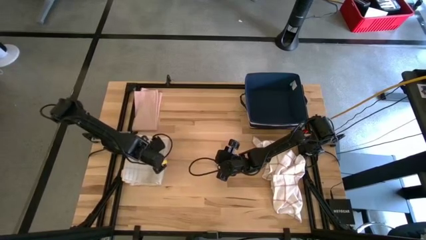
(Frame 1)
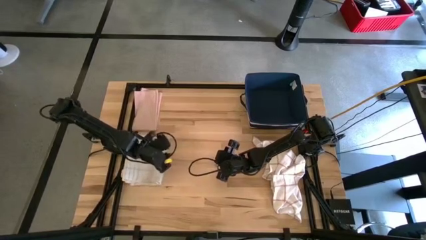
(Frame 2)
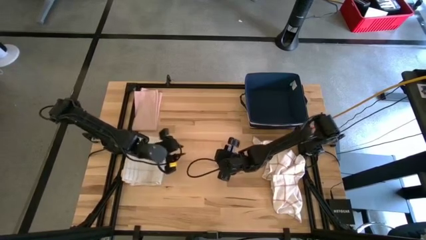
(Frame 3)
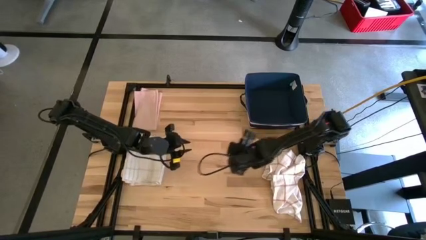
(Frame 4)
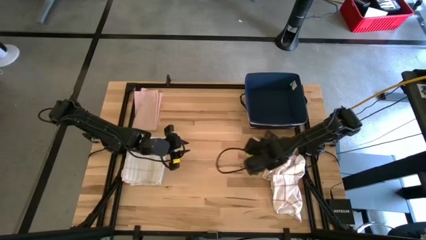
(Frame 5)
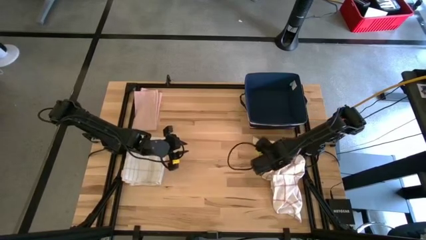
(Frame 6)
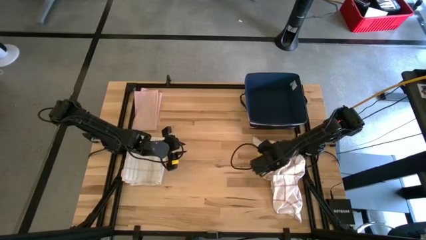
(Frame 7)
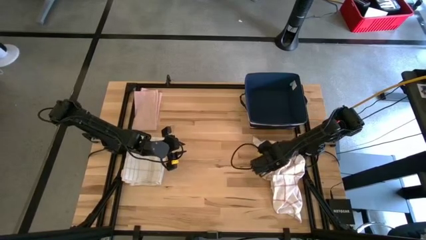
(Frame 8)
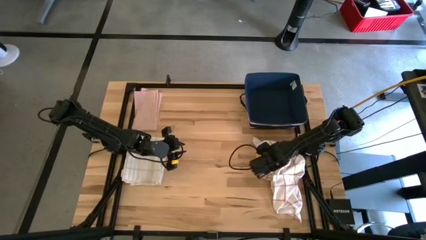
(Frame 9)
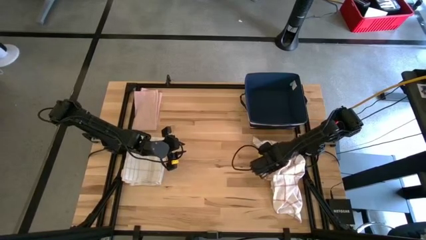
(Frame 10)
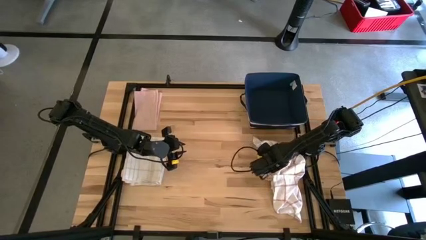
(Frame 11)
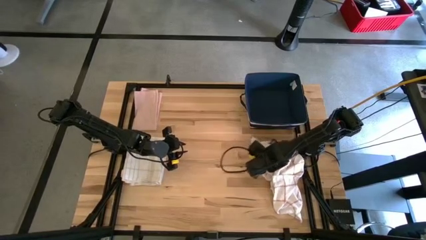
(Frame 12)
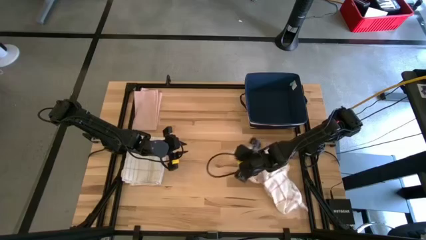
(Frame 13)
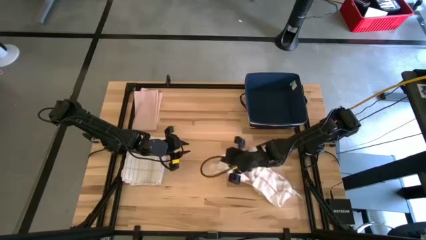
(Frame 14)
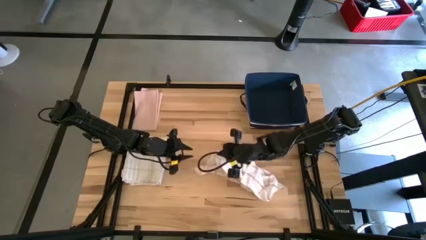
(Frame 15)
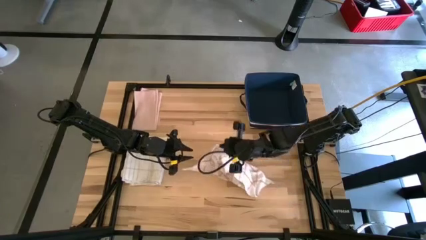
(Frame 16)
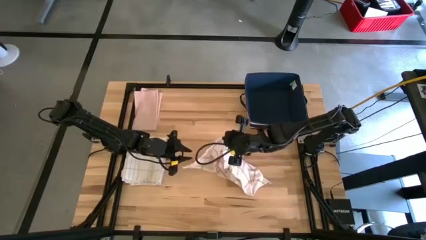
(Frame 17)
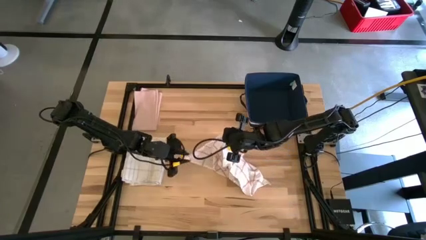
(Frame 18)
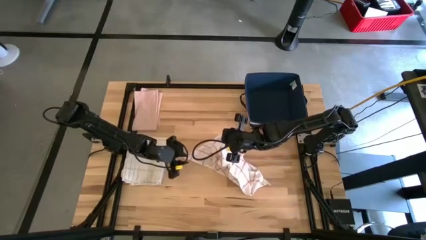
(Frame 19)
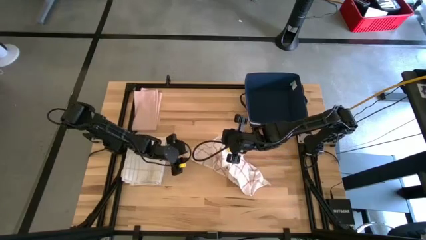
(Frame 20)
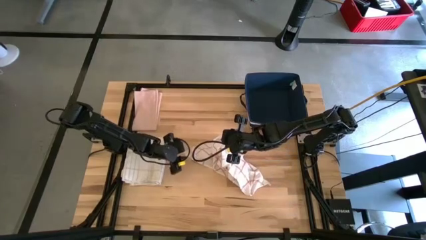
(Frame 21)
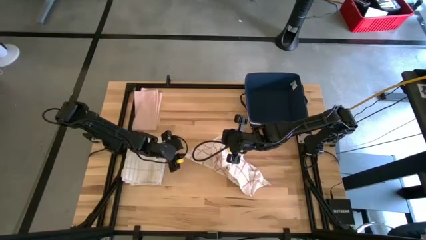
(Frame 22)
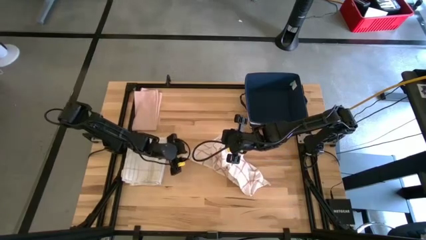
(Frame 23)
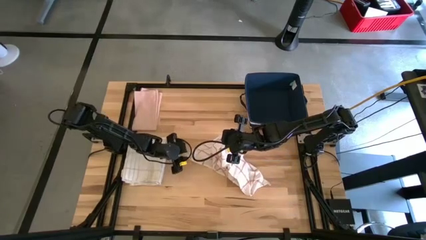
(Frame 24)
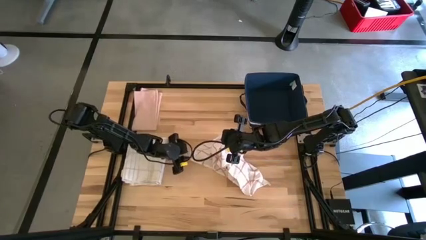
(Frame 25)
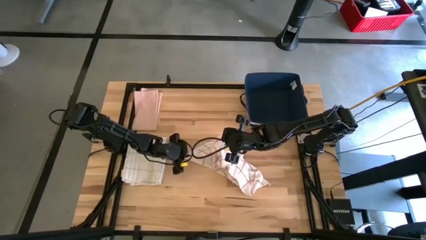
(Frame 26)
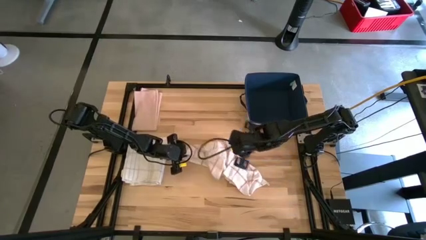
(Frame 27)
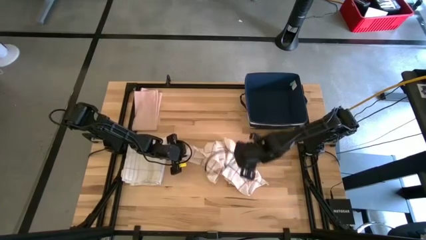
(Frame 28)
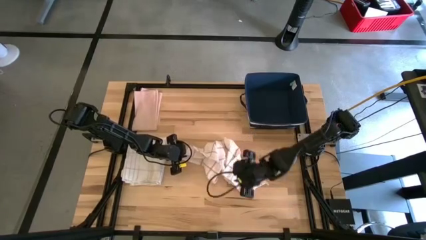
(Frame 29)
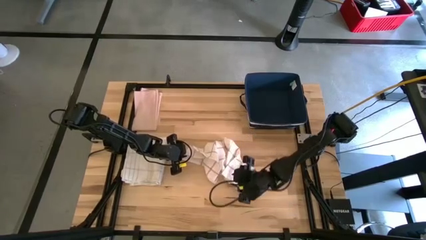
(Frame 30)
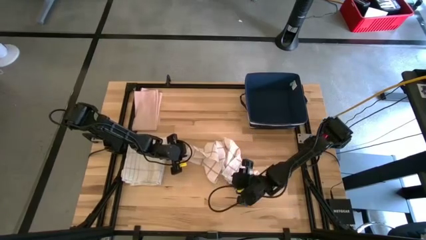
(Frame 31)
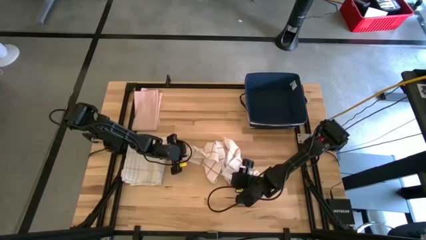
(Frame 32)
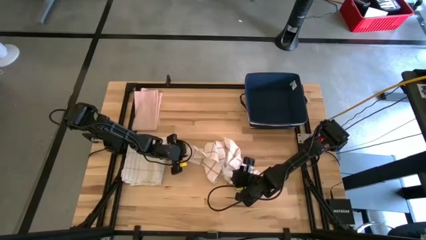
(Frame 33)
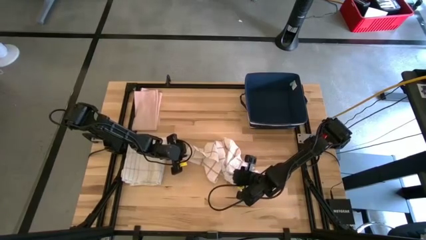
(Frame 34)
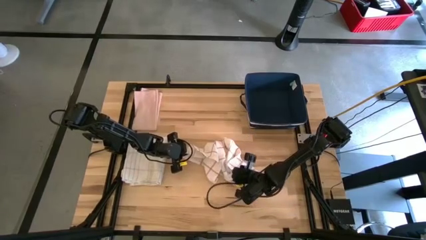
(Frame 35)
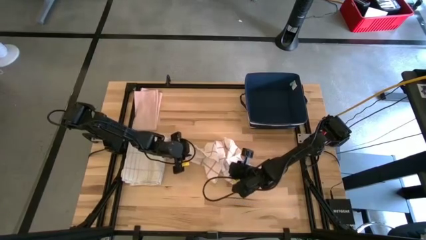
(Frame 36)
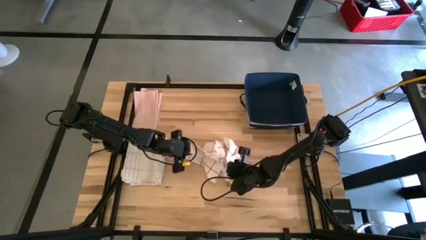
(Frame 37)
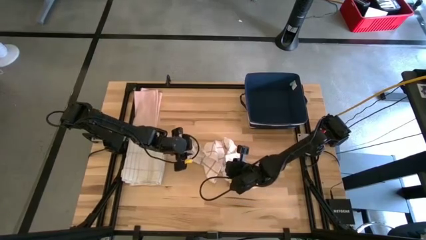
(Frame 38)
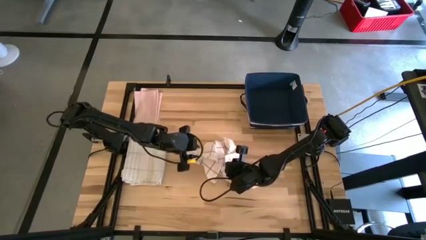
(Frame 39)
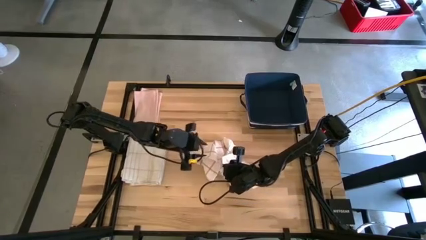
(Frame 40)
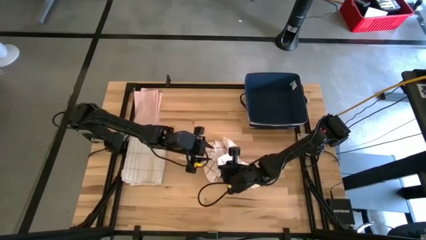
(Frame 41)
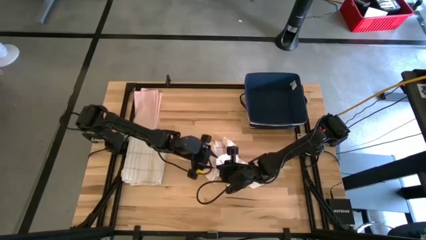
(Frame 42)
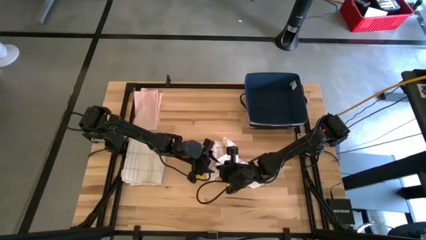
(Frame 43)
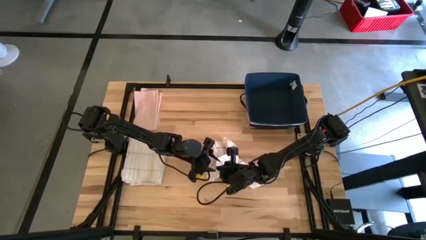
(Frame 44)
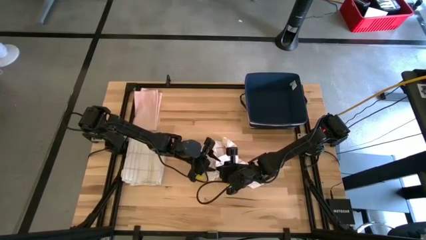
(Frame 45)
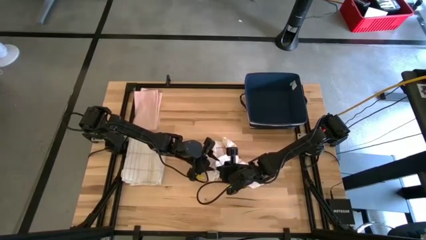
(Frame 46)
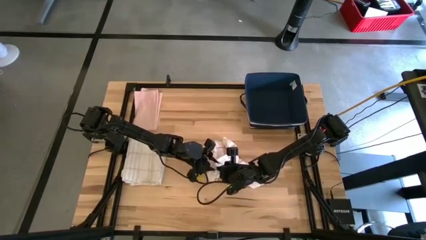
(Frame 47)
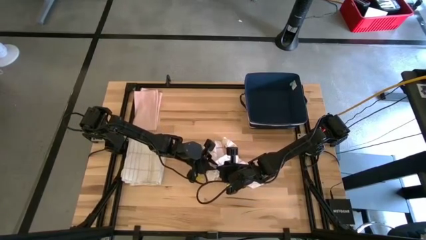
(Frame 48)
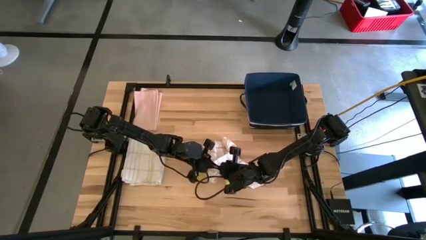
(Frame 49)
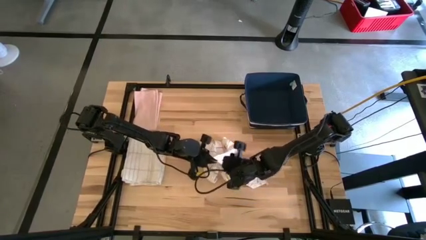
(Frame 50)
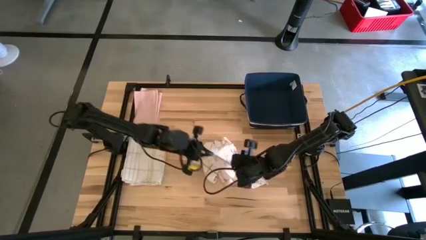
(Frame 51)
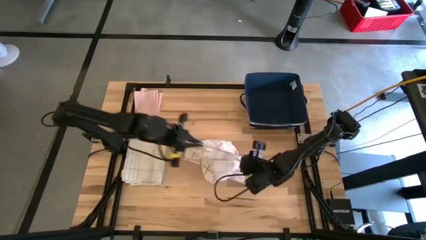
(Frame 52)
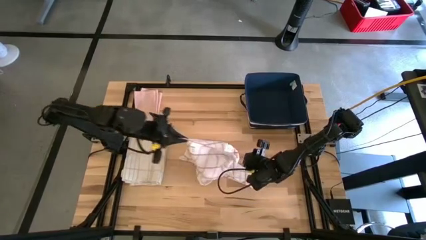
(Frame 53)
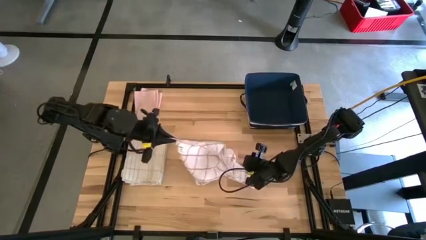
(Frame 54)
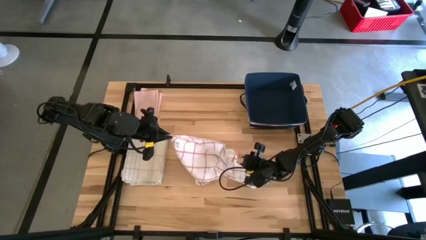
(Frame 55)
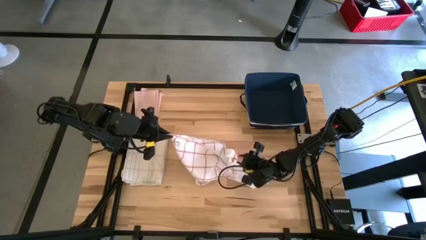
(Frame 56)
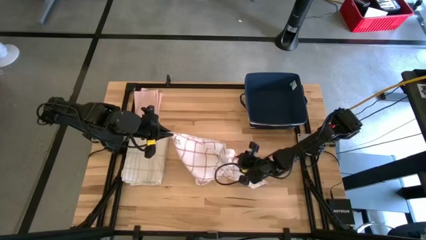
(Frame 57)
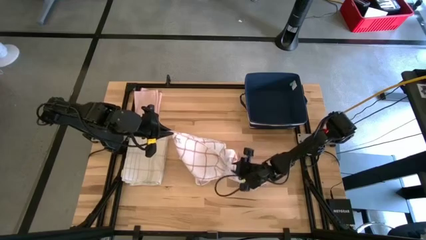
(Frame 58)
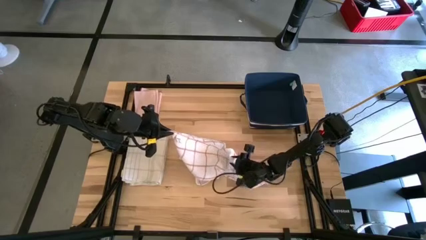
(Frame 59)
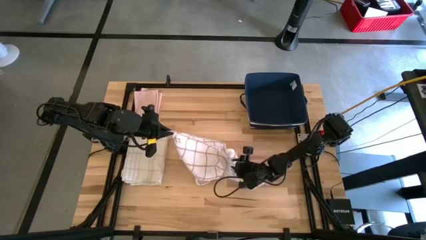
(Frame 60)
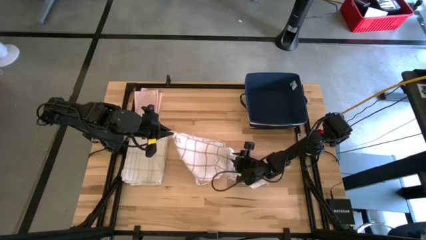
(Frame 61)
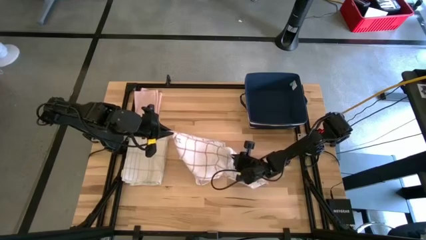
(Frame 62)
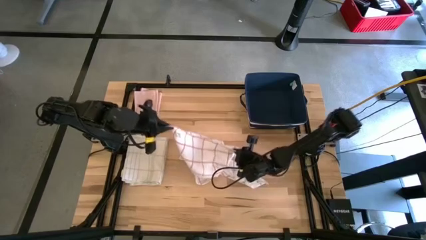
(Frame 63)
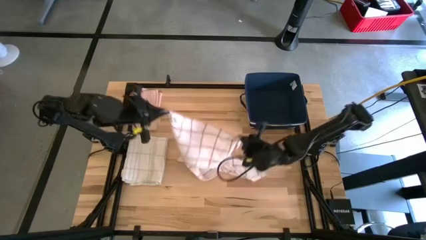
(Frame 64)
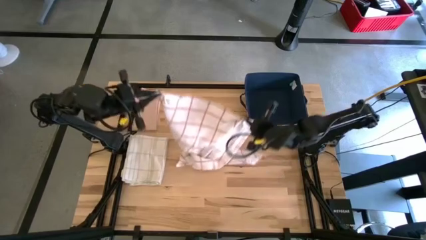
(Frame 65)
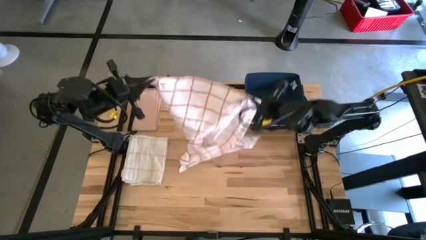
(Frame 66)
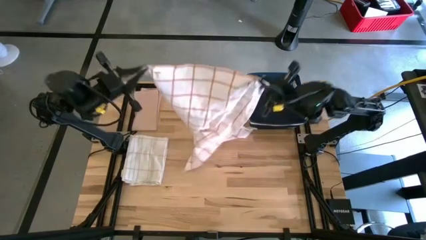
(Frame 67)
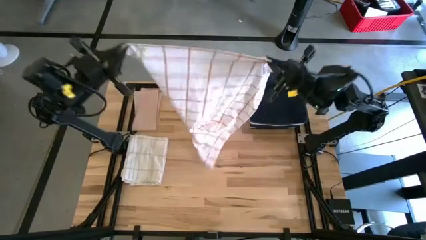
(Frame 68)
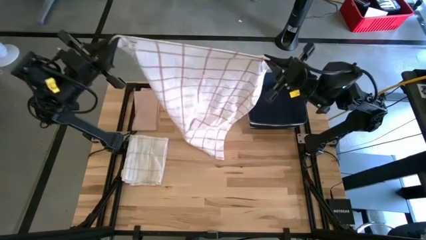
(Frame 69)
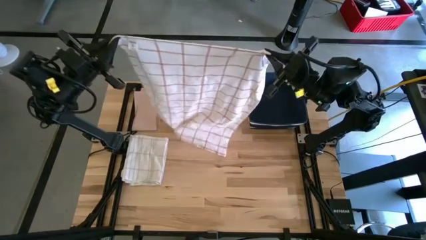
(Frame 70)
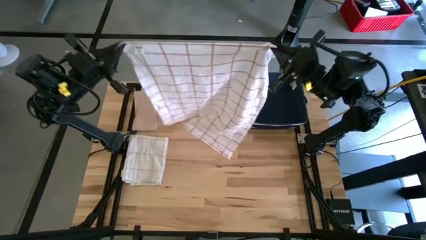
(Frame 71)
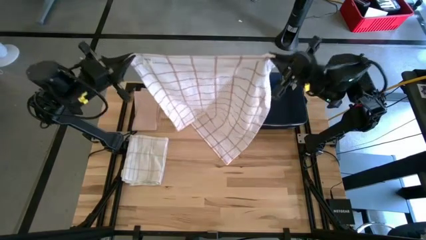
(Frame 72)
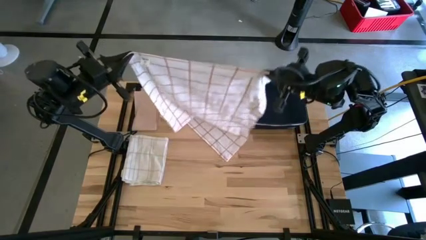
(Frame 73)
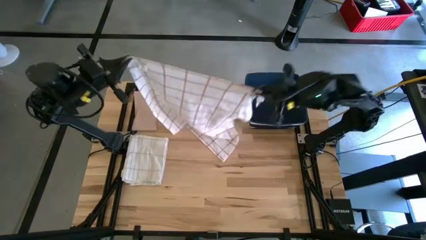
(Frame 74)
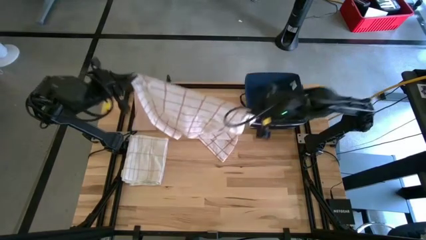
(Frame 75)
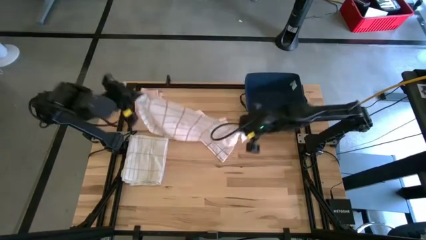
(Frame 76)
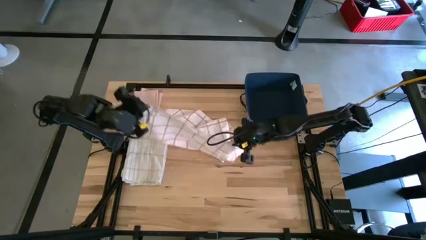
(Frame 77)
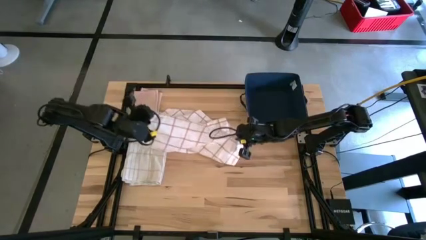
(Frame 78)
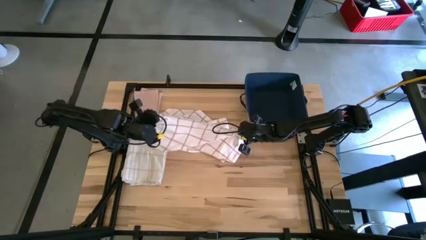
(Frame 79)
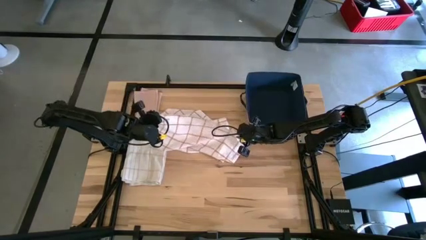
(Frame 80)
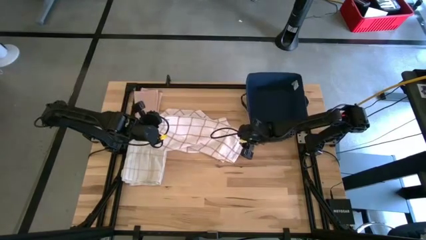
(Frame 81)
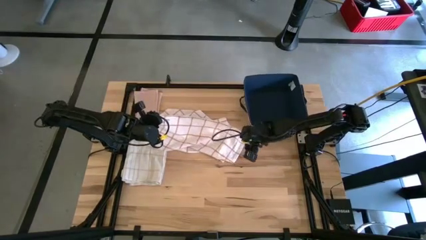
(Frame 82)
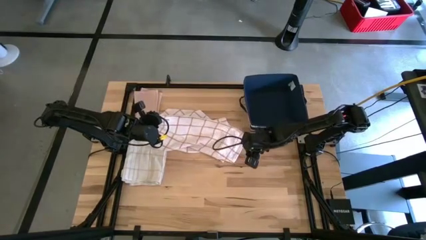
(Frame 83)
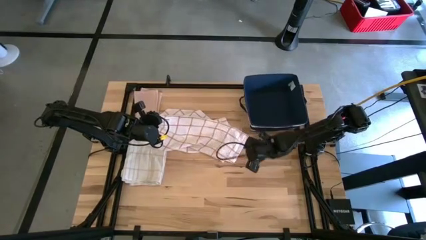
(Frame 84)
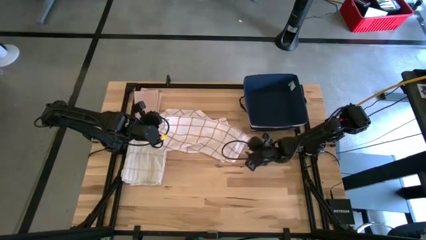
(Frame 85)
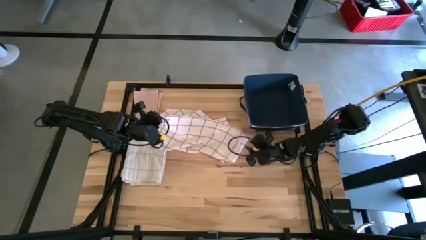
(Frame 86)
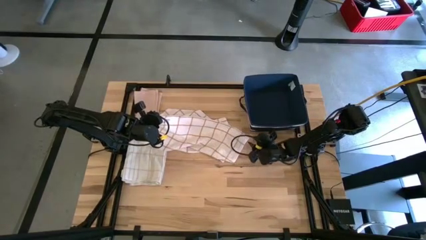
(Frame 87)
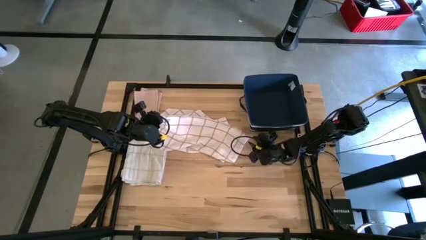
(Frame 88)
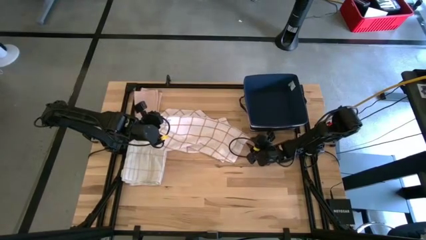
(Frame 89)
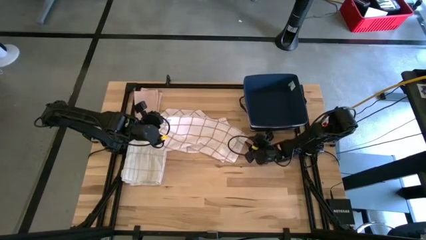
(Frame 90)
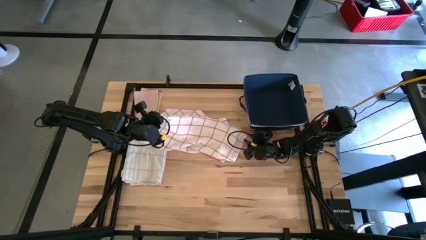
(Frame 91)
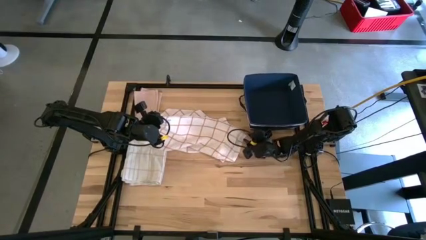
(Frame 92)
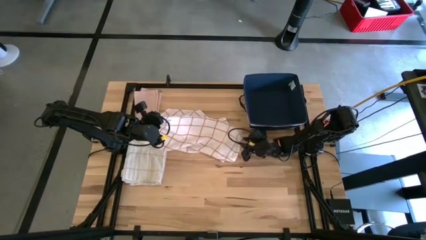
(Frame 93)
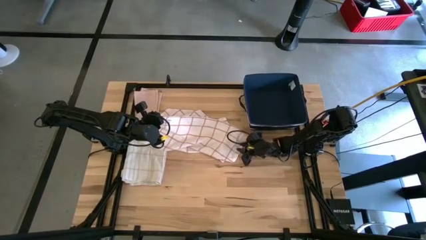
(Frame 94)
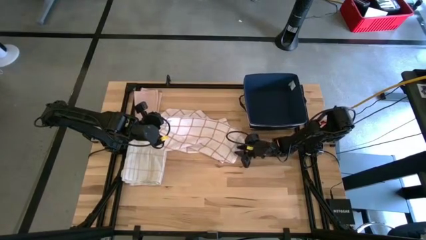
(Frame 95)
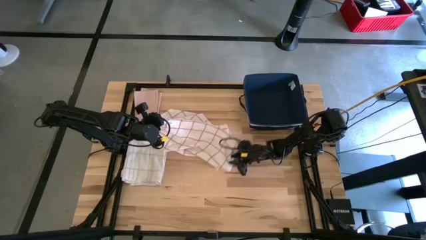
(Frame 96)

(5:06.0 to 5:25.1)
Task: Fold towel
Fold the white squared towel
